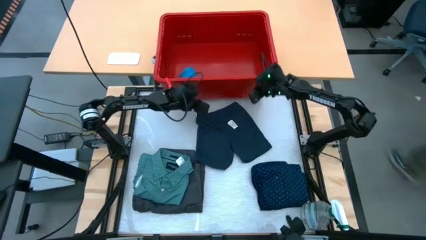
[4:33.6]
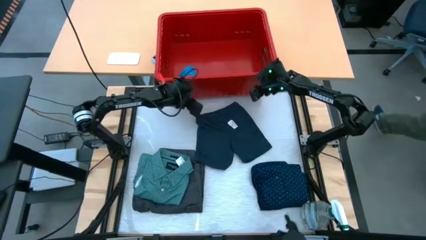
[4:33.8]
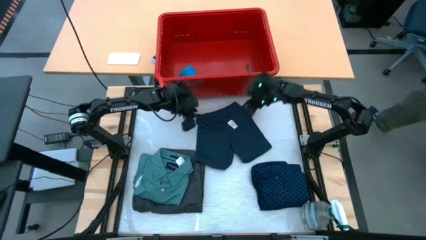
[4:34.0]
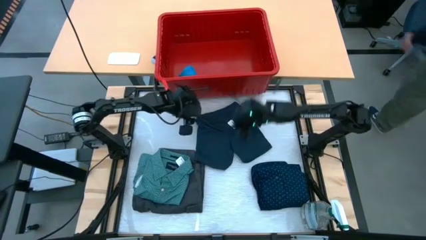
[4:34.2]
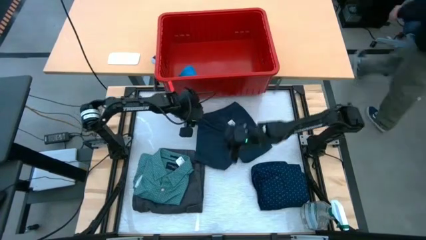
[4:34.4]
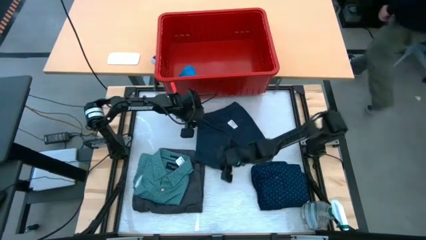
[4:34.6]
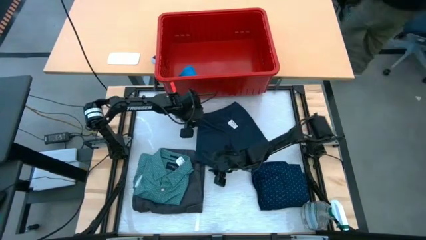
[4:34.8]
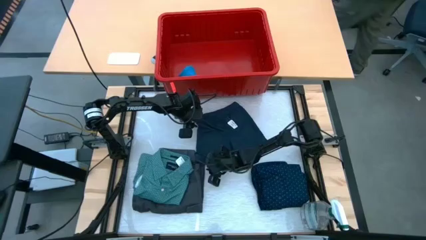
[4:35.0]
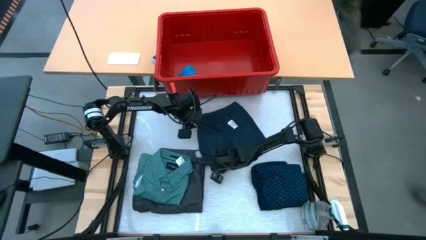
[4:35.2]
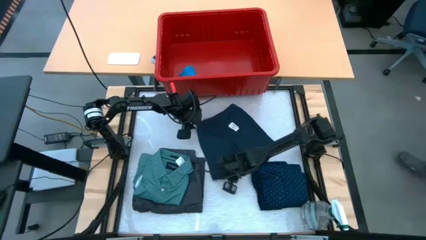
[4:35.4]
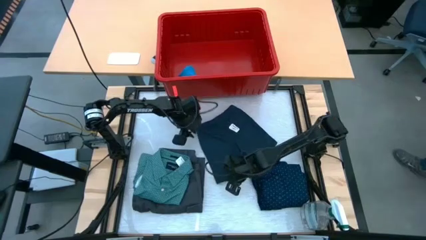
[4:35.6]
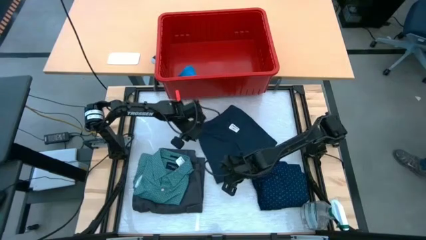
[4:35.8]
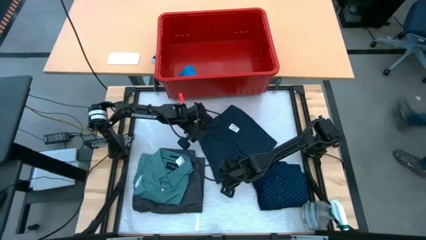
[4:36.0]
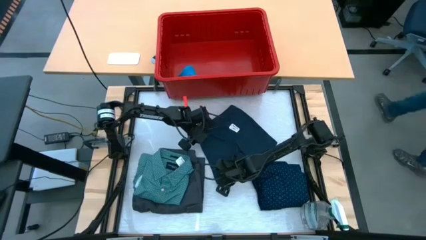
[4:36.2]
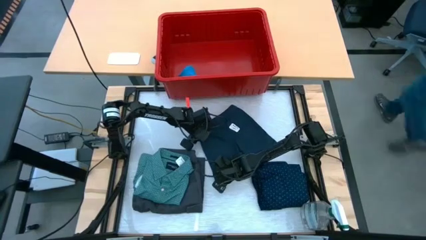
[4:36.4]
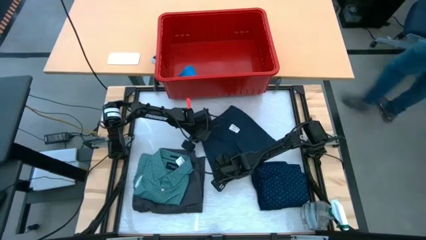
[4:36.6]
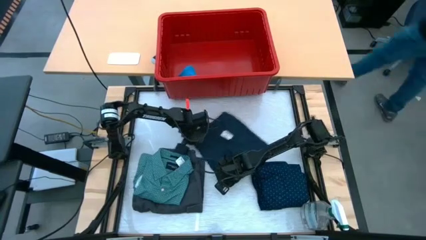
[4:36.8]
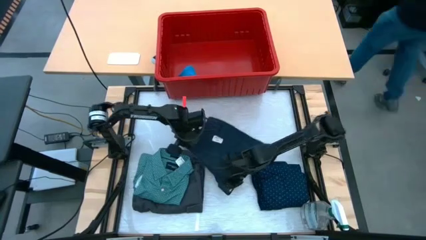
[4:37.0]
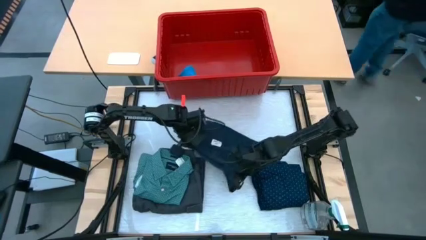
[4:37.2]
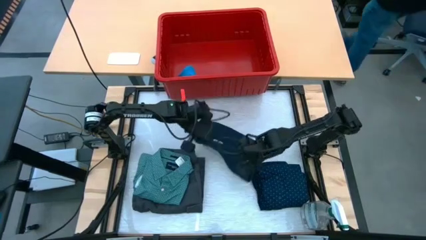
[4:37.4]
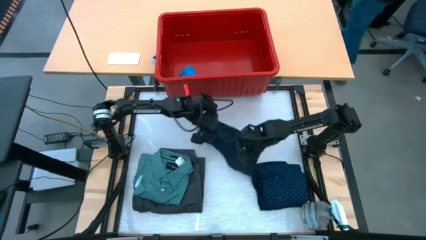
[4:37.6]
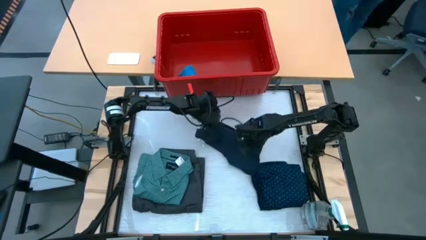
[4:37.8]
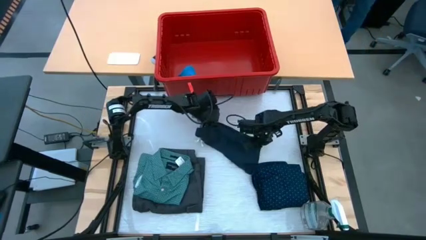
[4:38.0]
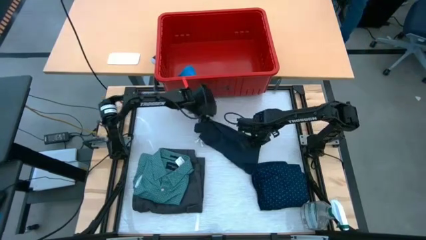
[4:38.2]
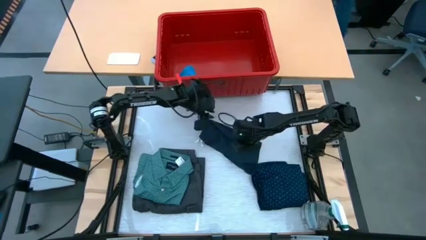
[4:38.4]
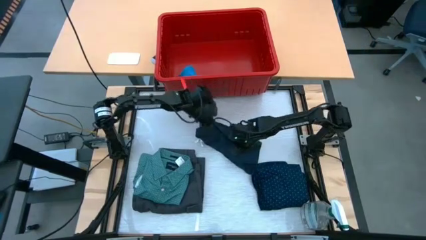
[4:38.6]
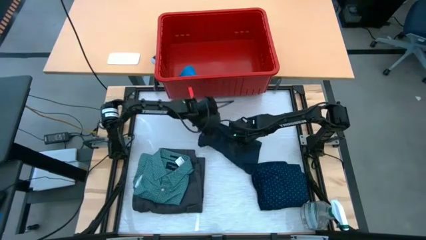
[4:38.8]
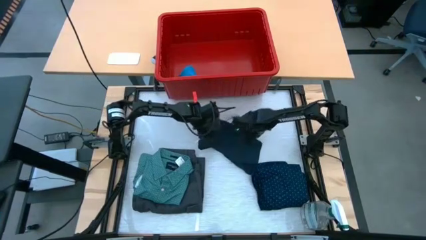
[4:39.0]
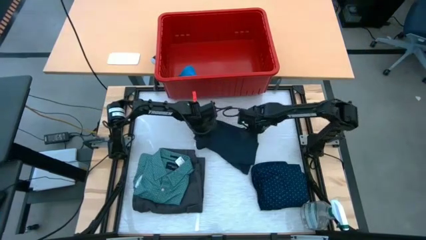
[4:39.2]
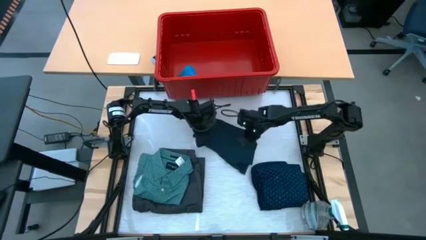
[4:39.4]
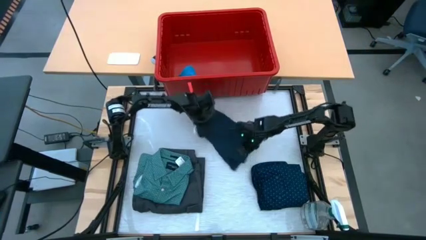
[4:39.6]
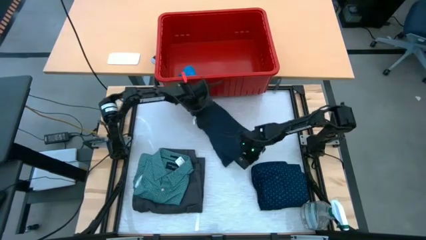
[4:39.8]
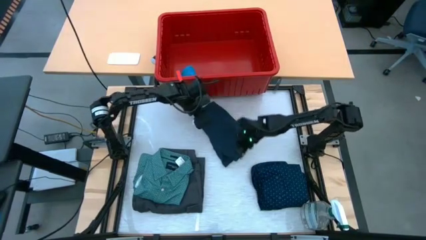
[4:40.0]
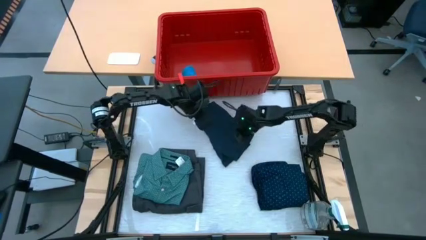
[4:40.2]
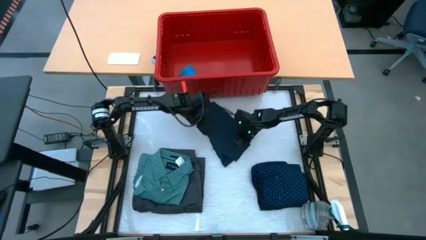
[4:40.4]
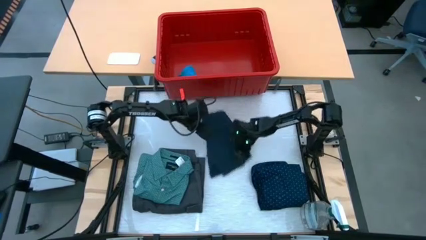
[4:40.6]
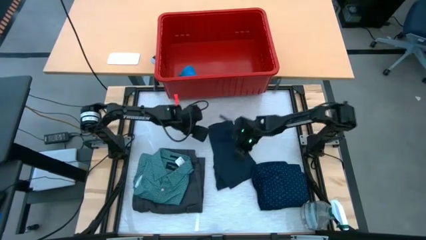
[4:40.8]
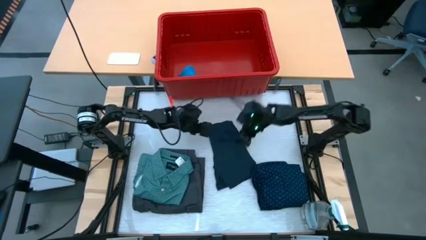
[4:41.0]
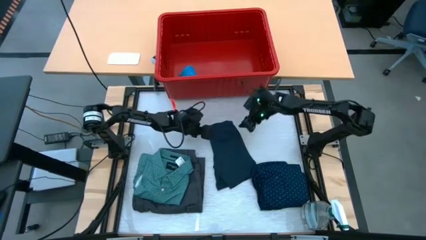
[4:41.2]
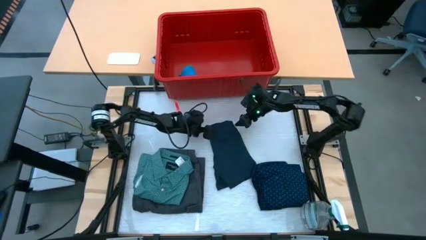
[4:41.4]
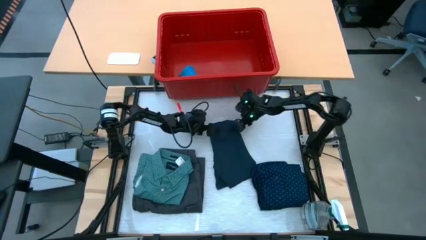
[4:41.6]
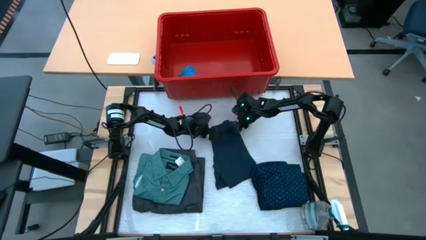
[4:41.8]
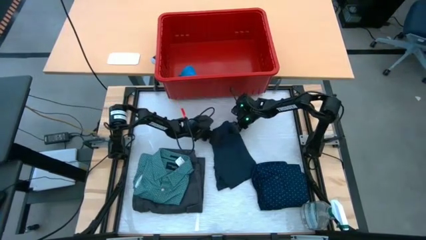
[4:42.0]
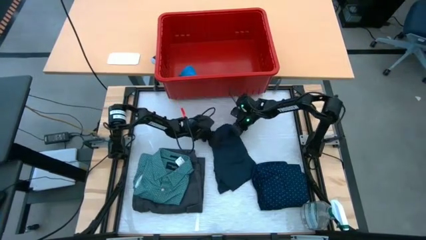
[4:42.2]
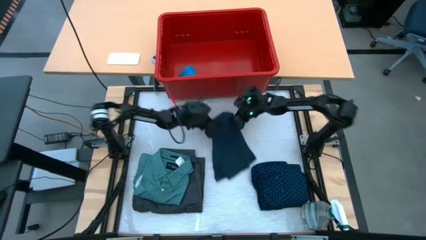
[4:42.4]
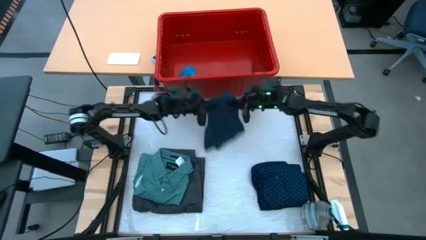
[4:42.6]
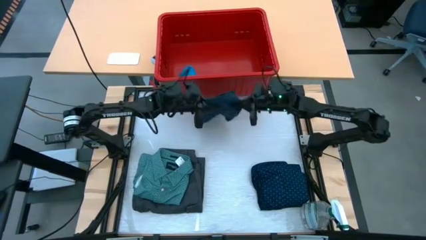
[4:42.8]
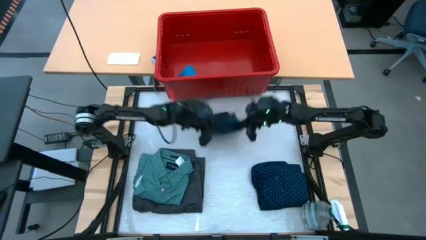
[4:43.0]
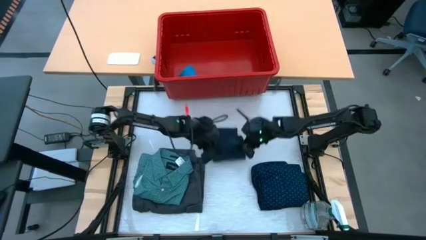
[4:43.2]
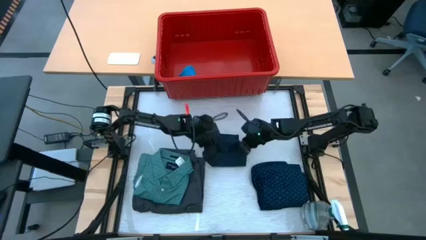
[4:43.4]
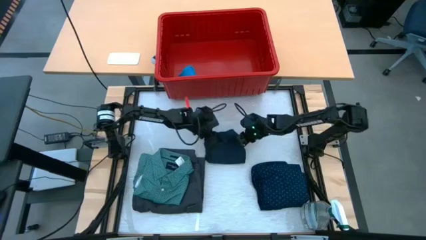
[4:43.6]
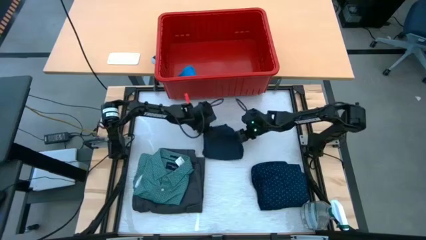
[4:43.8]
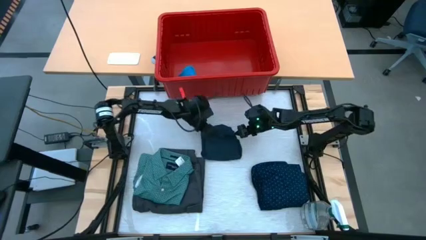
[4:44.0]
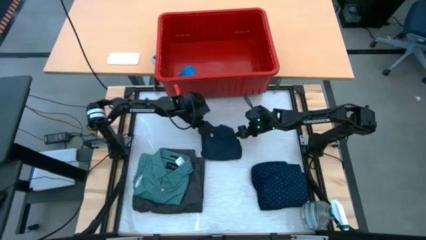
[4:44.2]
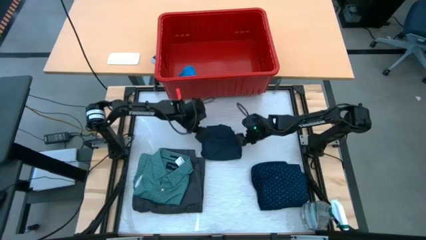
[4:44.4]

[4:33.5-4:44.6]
Task: Fold laundry
Fold the dark blue shorts

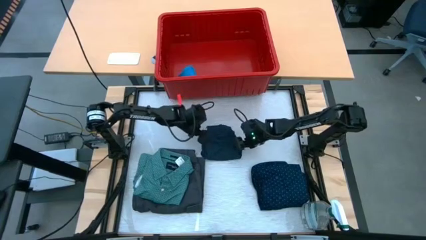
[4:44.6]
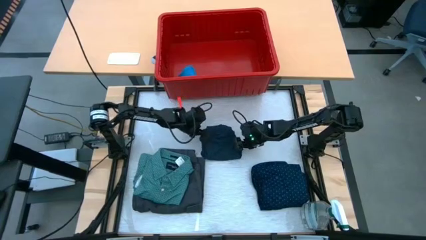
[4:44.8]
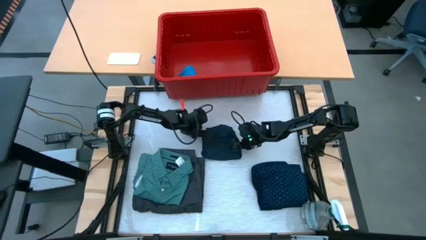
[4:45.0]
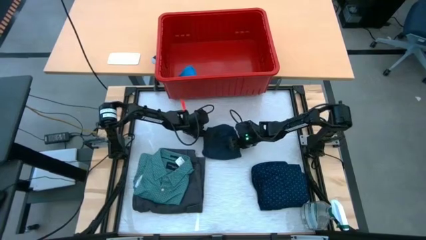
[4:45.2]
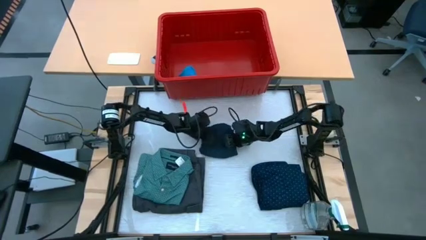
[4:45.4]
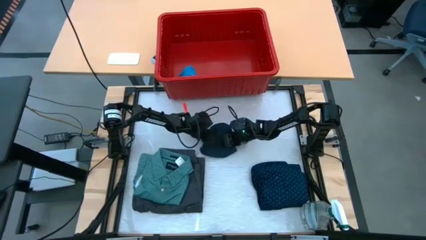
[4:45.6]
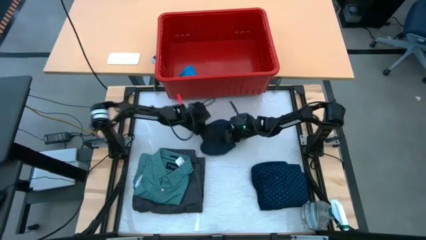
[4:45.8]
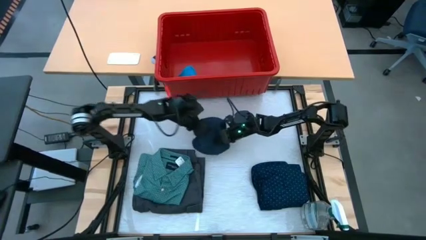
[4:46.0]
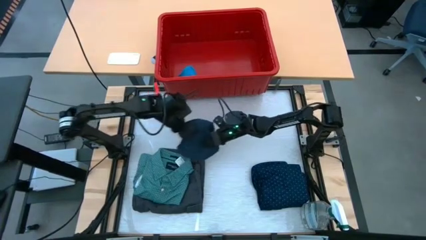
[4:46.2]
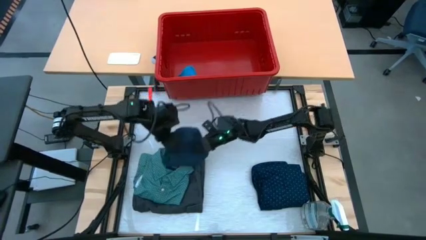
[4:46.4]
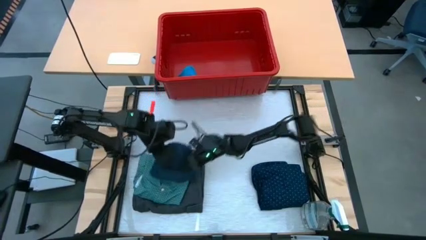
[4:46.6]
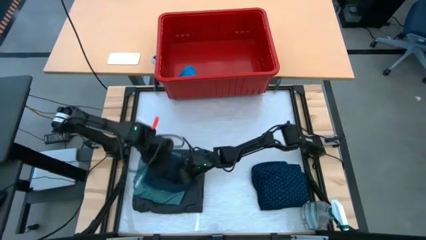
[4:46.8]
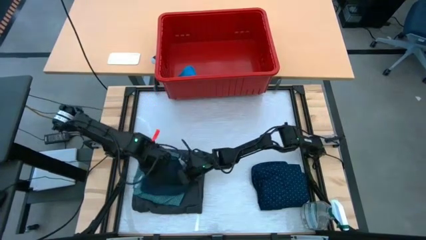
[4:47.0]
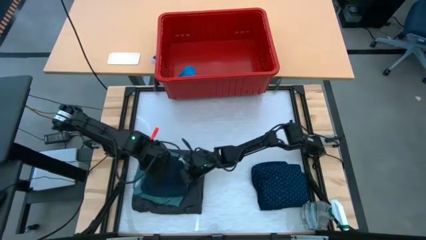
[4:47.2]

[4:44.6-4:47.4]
Stack the dark blue shorts on top of the dark green polo

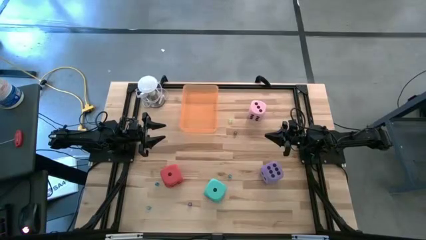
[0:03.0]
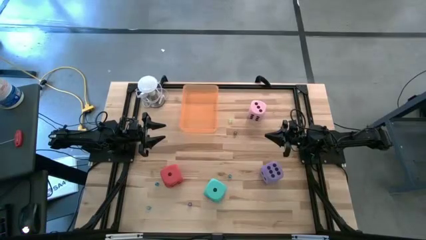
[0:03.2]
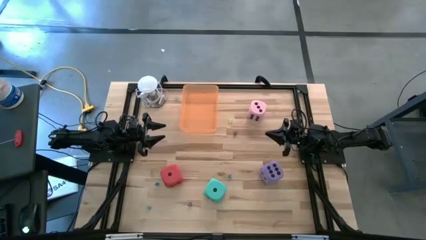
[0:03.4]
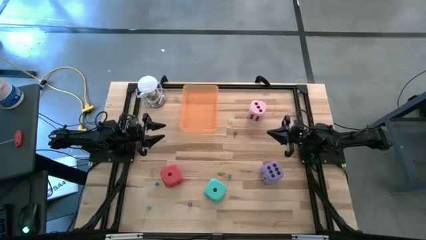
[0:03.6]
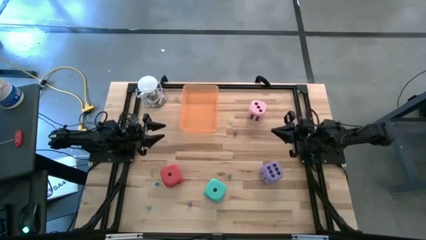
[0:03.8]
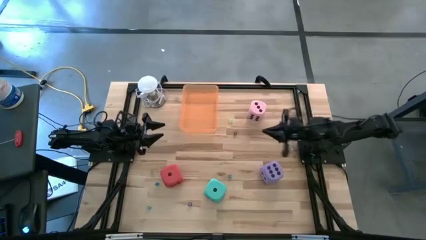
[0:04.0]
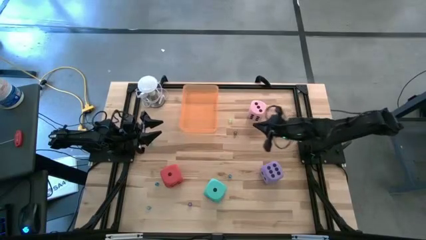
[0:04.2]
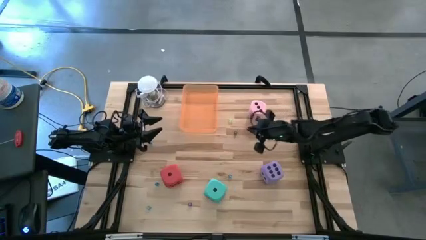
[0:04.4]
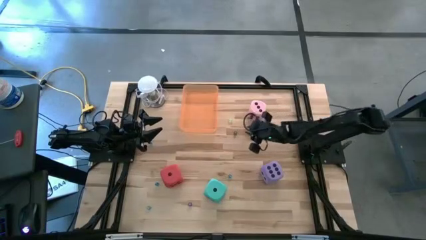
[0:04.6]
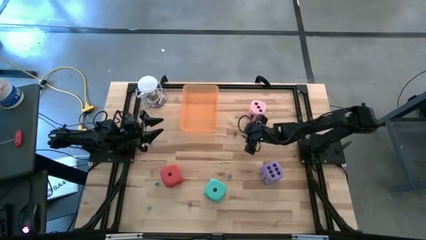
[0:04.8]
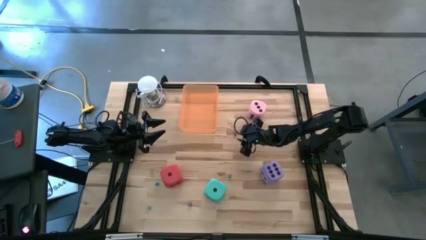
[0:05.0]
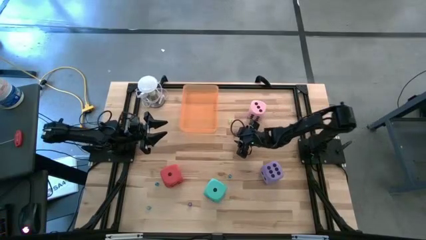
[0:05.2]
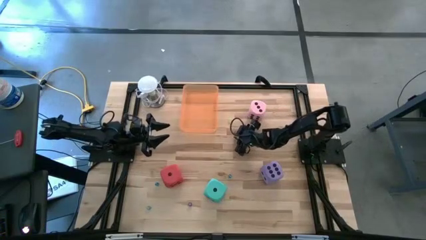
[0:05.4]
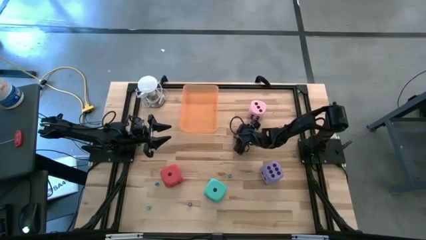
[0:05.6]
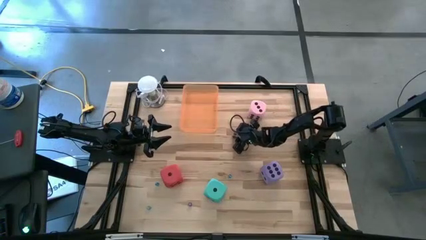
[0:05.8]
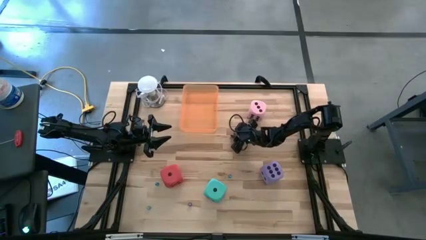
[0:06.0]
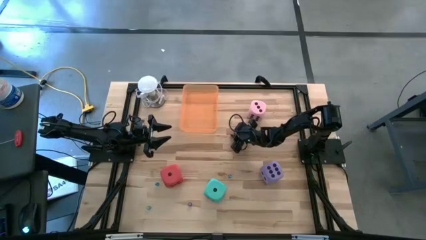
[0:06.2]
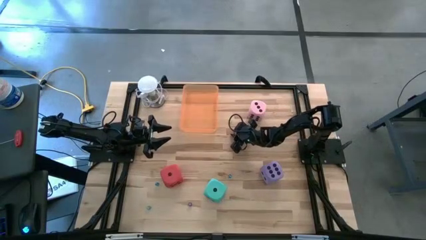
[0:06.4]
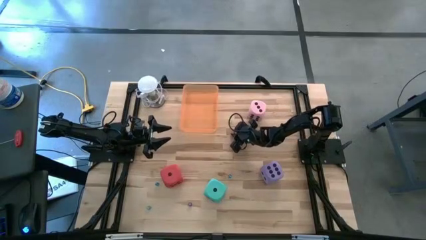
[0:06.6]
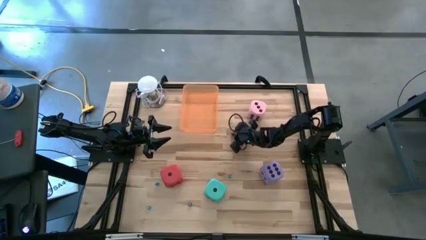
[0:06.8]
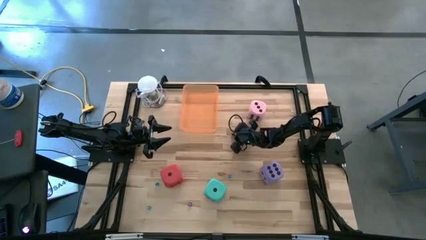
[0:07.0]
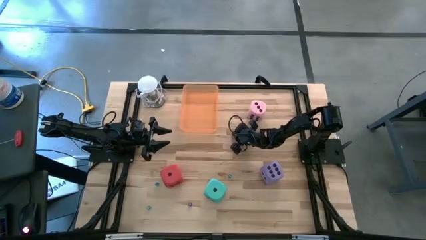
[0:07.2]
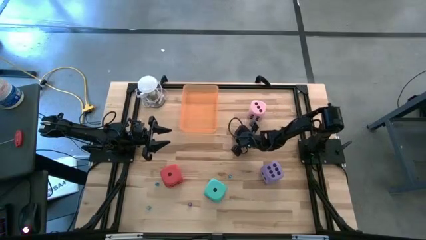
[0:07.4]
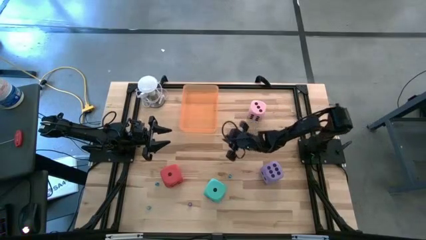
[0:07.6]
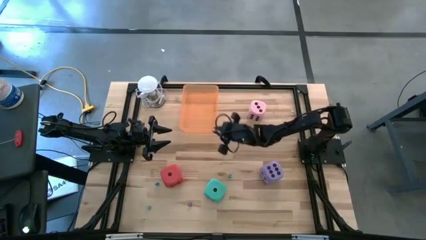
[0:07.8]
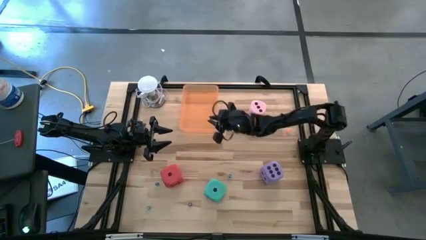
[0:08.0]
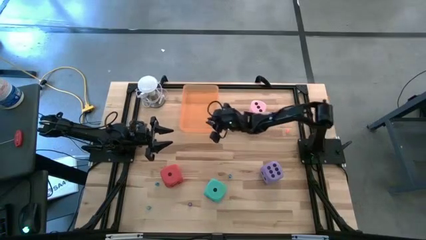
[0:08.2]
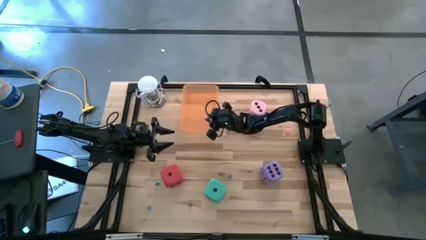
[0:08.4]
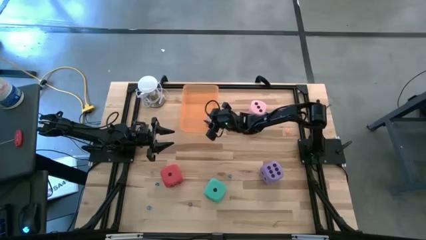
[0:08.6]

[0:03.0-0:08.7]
Task: Pick & Place Dice
Put the small black die into the orange bin
